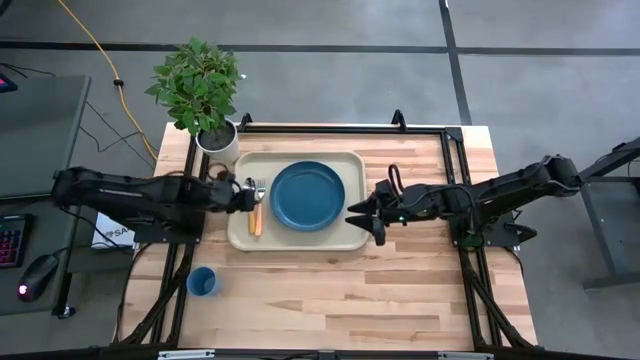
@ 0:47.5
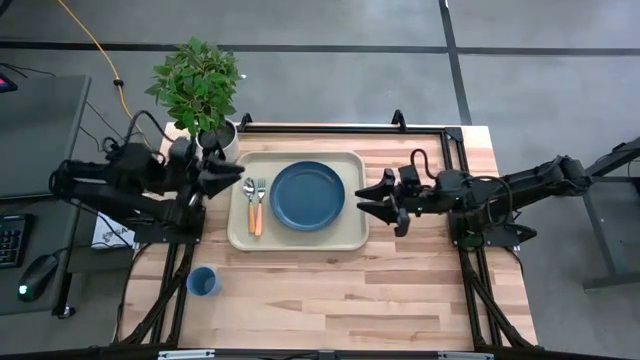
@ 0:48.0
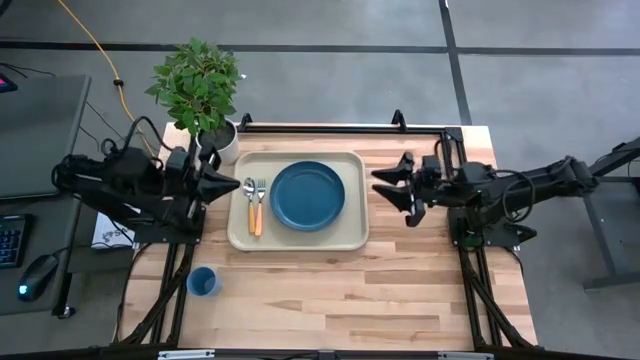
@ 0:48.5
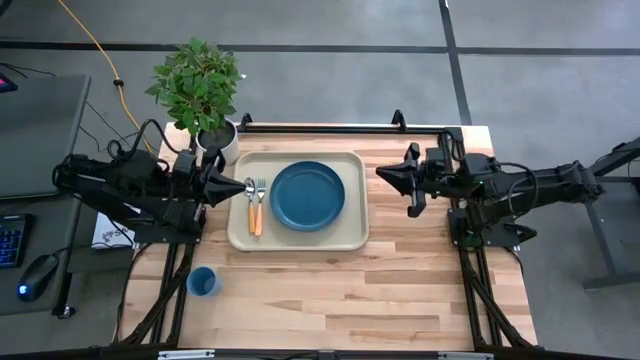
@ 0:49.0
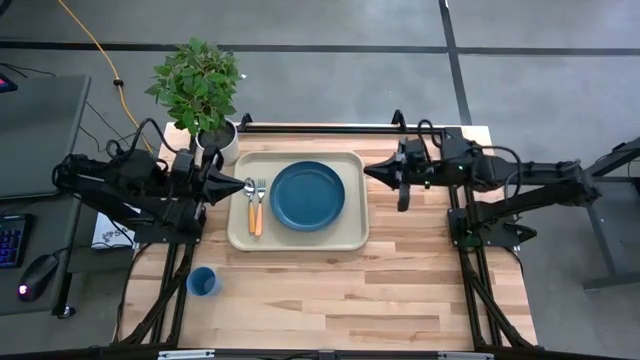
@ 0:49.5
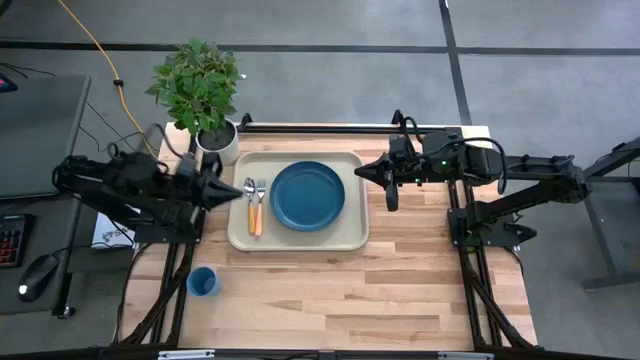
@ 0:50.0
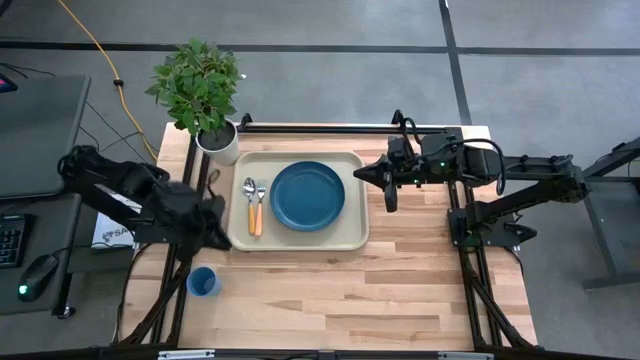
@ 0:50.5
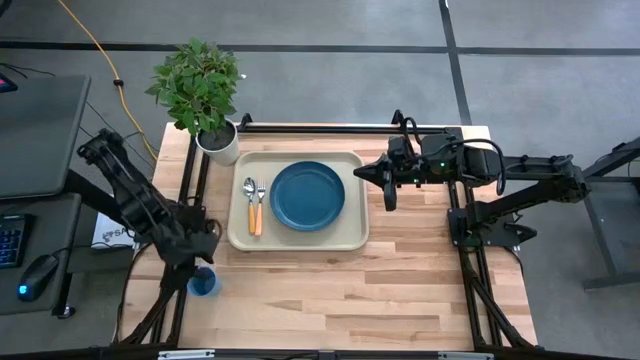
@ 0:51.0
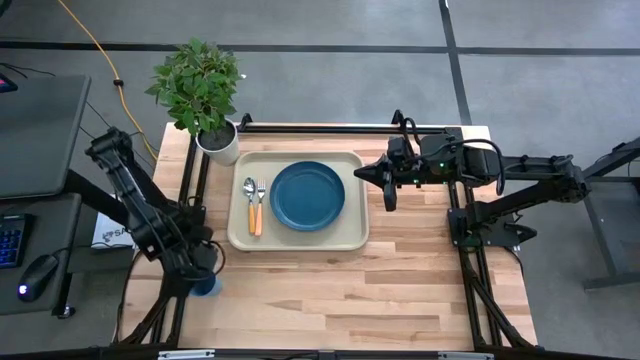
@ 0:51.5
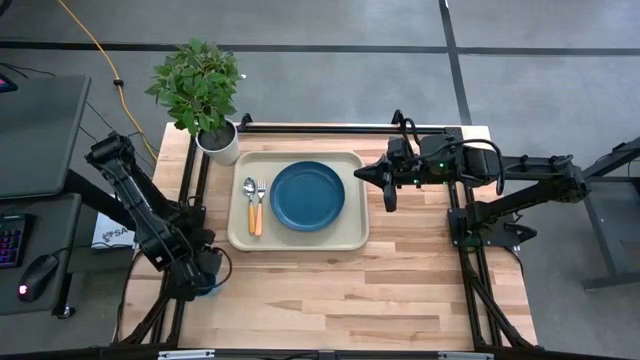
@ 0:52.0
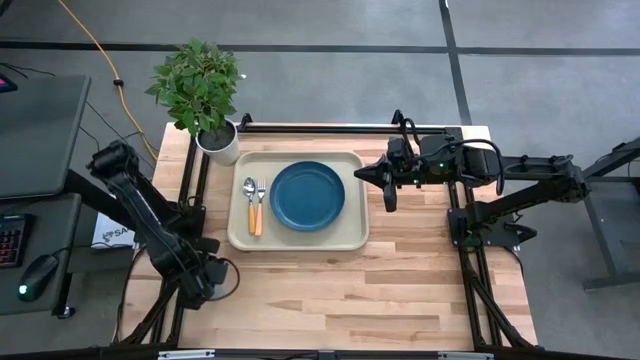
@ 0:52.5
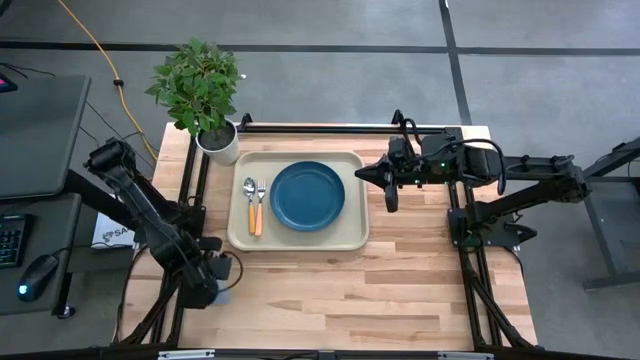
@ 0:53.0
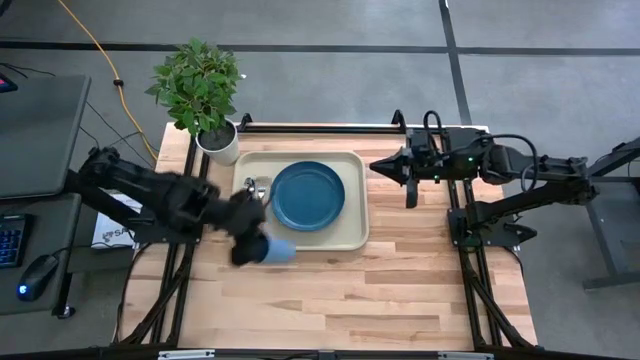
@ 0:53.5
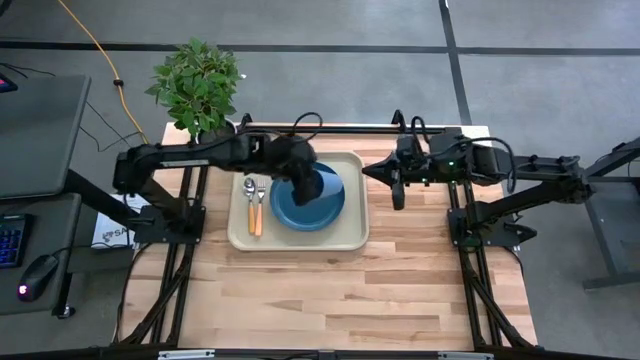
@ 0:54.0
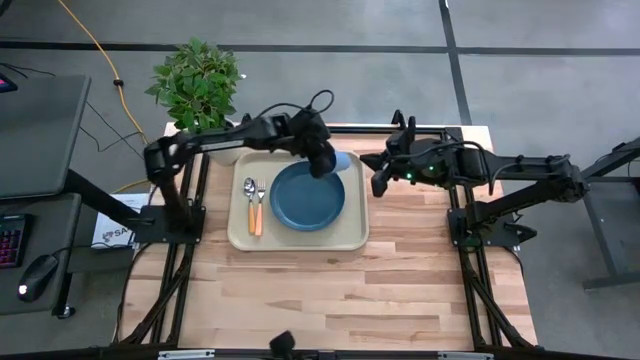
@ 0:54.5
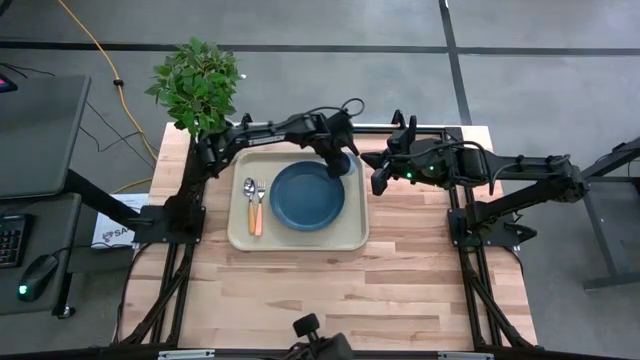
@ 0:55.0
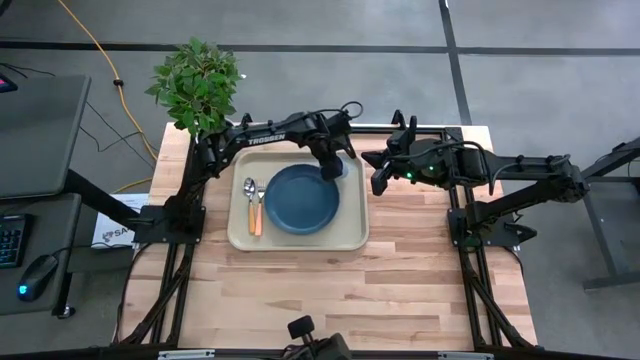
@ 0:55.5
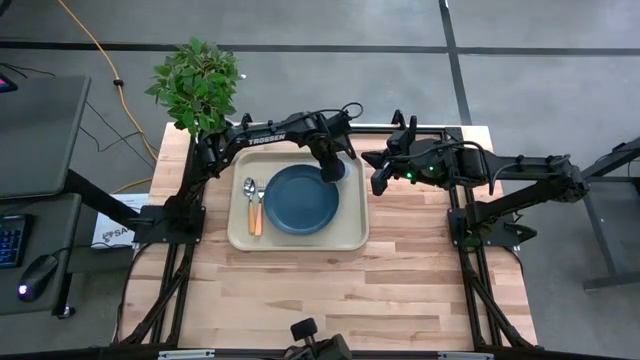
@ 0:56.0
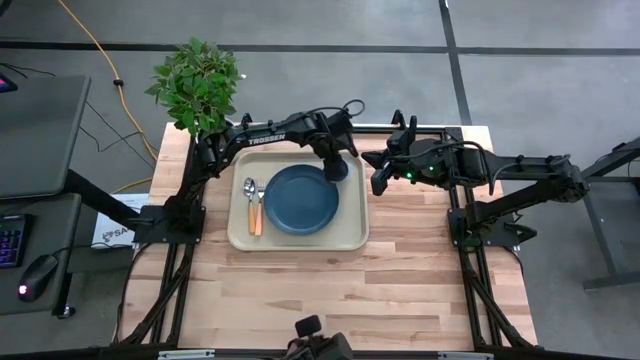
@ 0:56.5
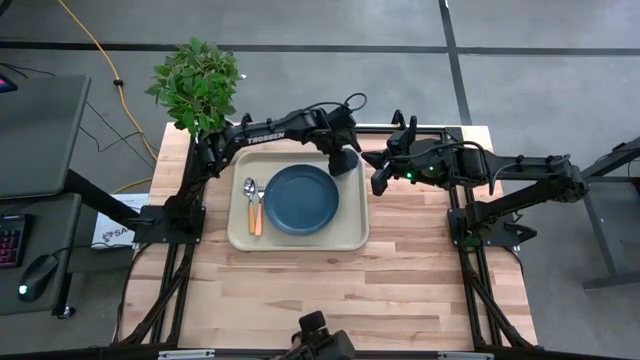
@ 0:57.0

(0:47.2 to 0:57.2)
Task: Pick and place plate/cup/fork/spoon on tray
Put the cup on the top right of the serving tray

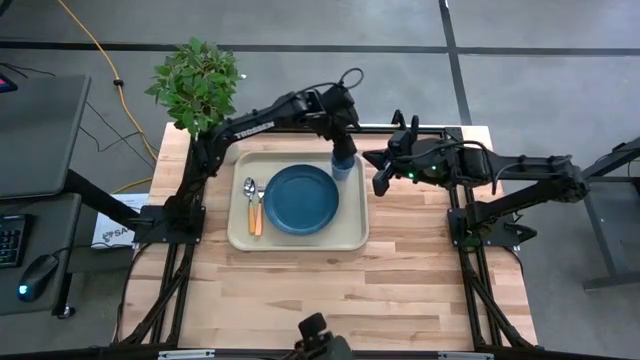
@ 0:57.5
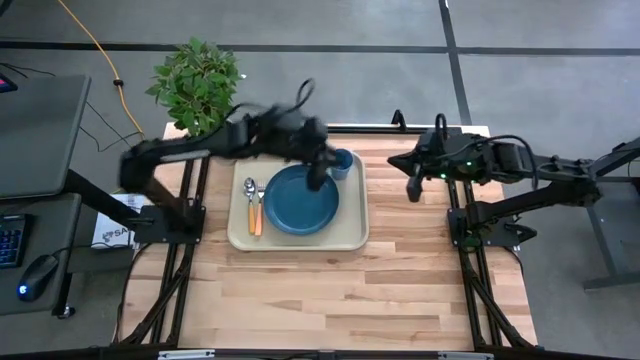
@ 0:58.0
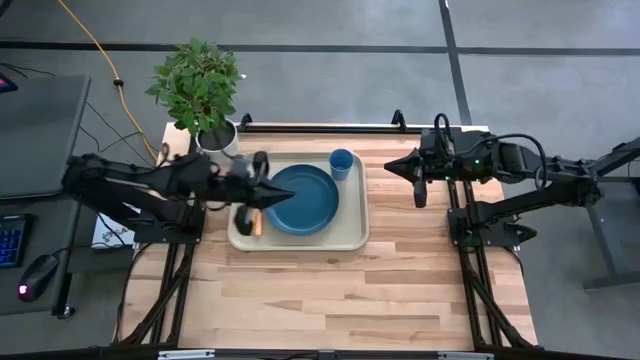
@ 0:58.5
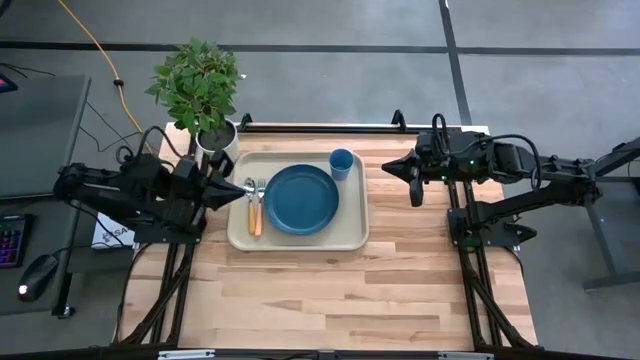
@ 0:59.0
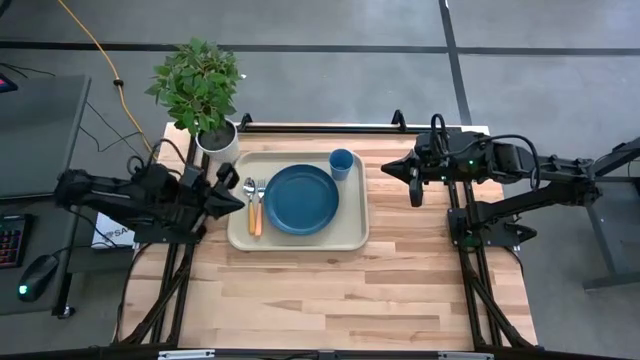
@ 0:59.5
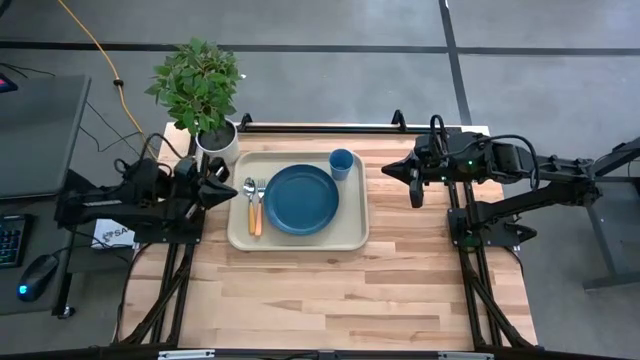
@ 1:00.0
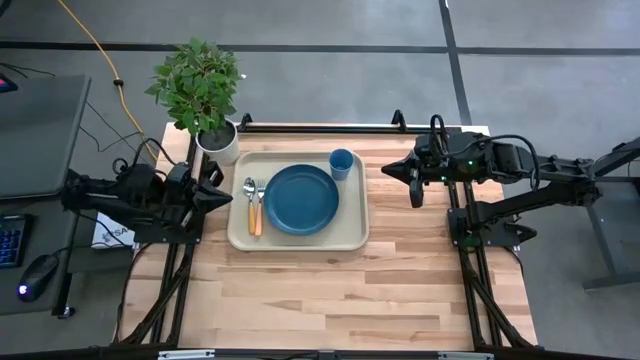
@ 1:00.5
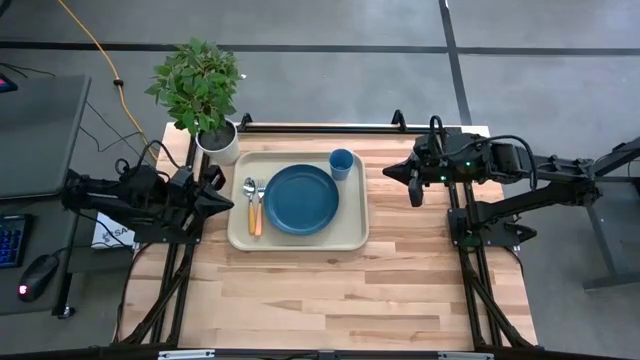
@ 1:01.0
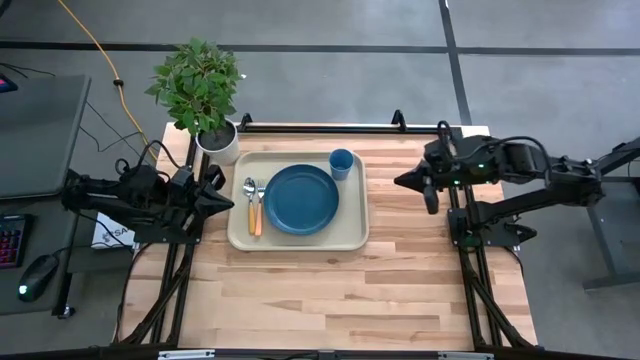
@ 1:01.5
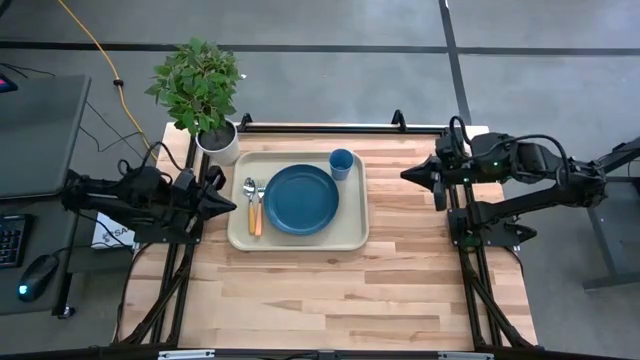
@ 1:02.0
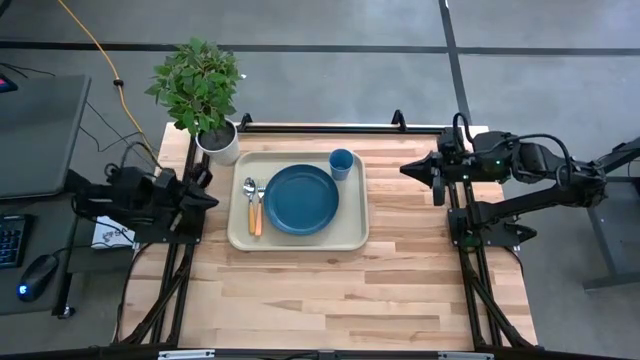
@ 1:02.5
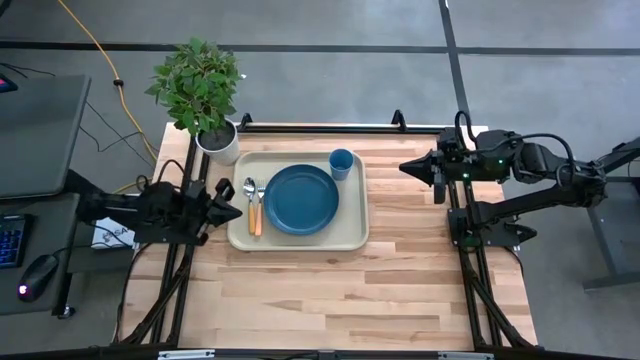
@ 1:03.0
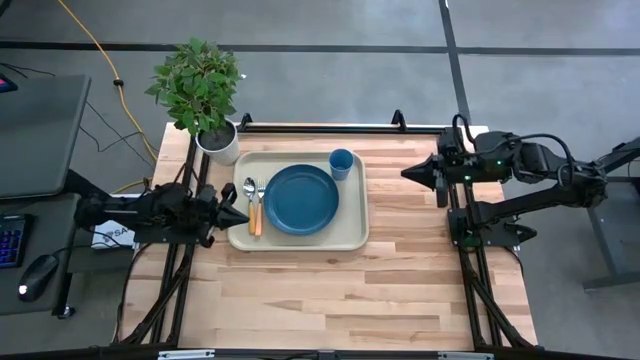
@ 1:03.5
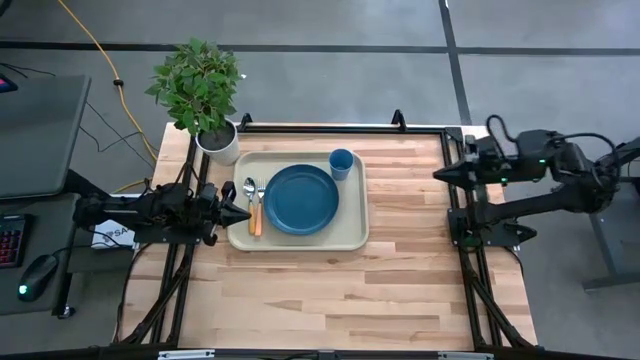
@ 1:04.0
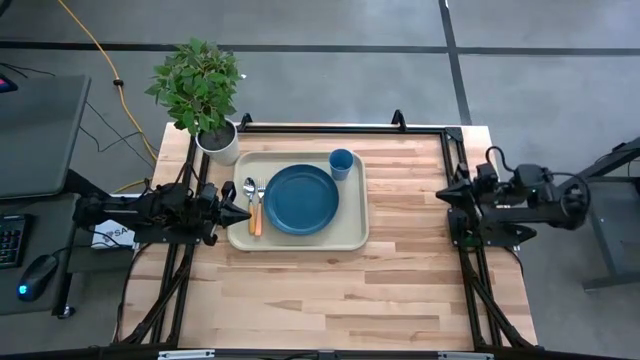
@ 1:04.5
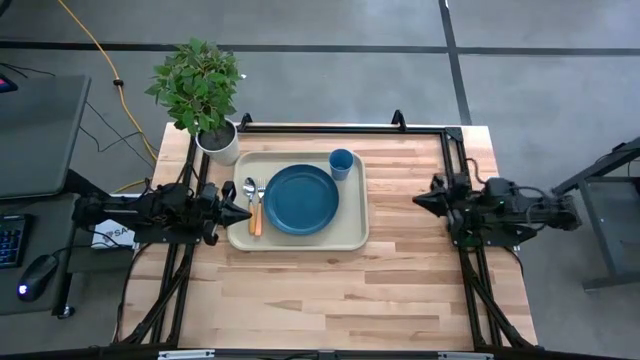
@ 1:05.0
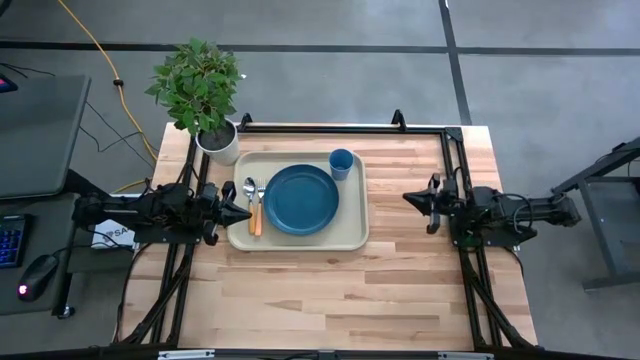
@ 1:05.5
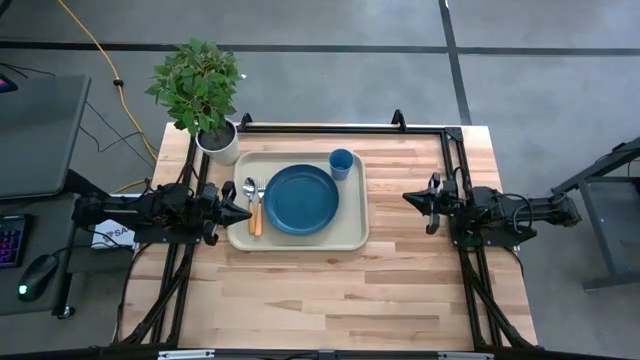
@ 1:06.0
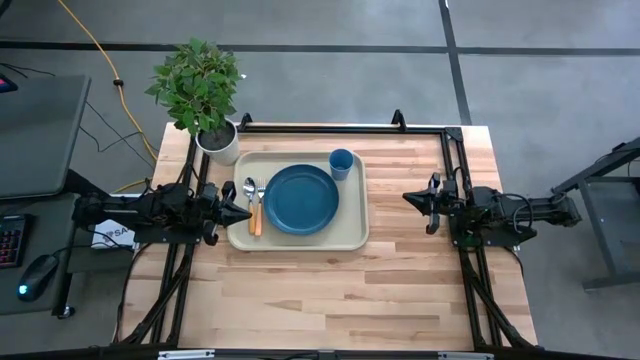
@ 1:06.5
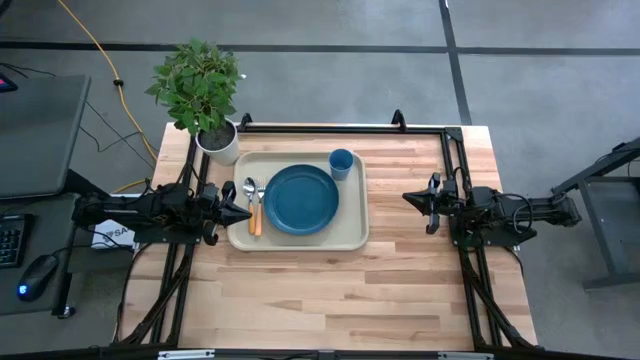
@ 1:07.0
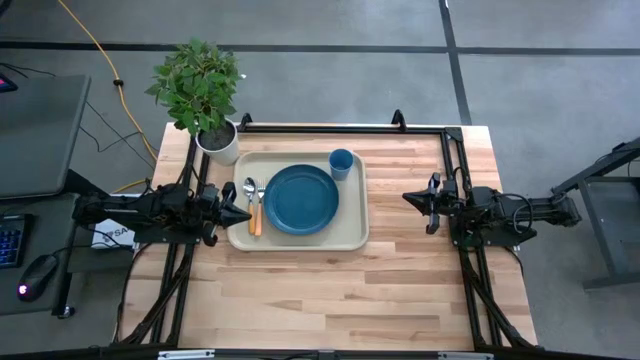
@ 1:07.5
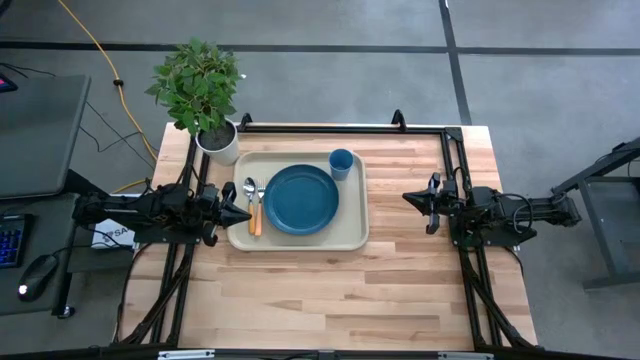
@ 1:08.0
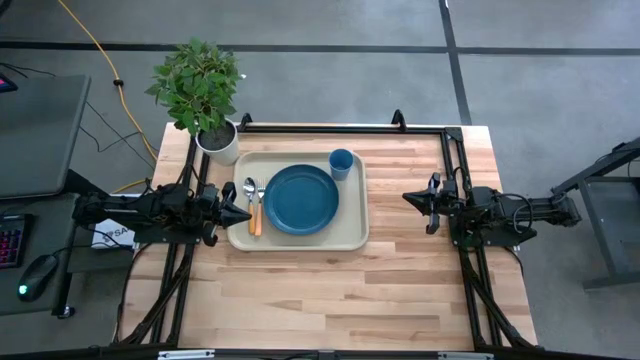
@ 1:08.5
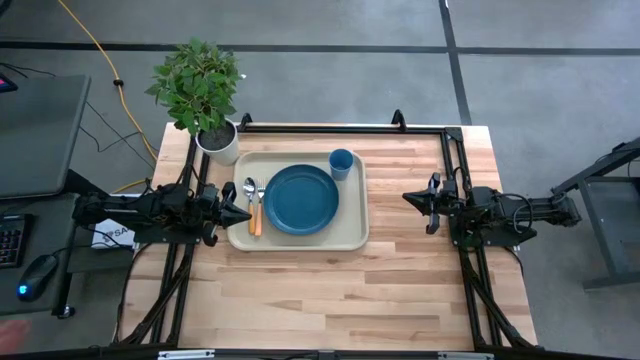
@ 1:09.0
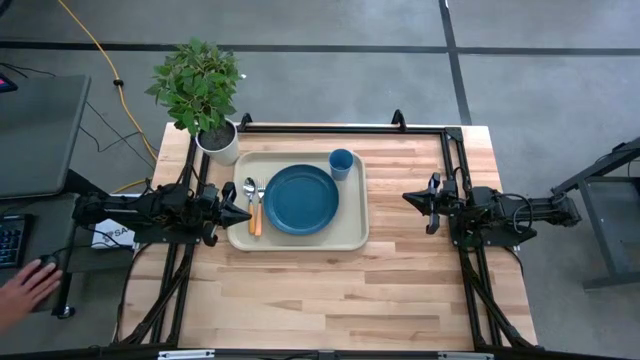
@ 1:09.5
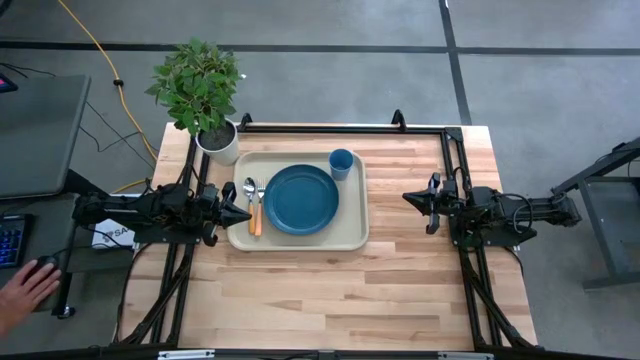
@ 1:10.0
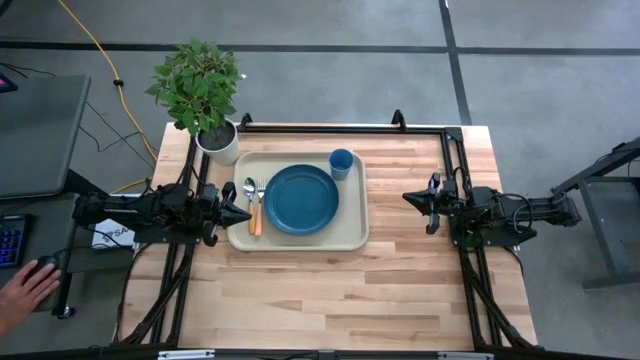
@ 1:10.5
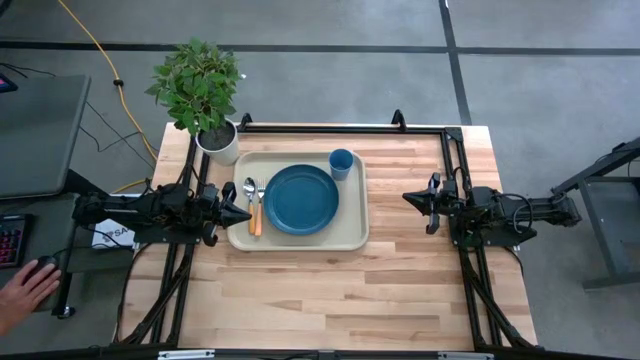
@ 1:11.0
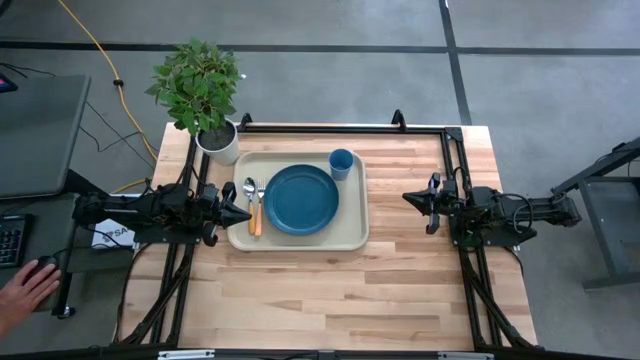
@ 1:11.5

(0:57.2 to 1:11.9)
Return to home position
